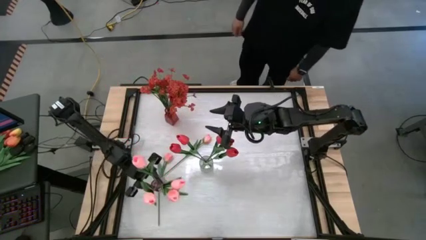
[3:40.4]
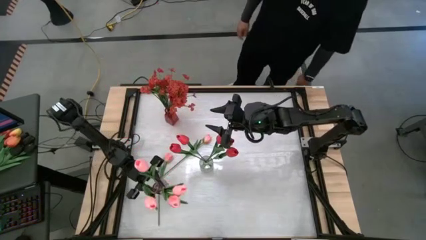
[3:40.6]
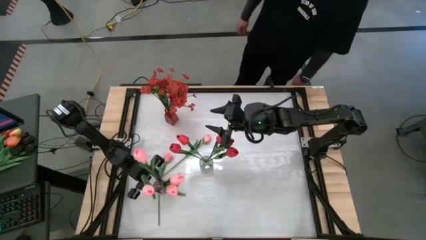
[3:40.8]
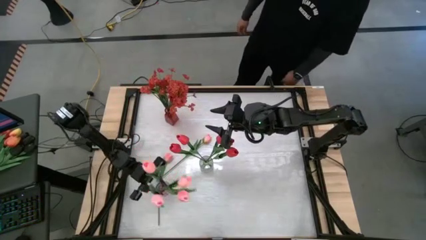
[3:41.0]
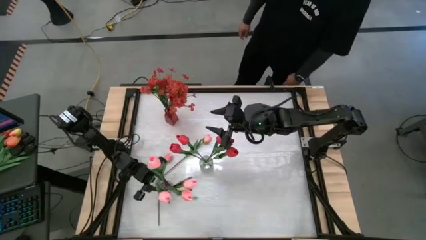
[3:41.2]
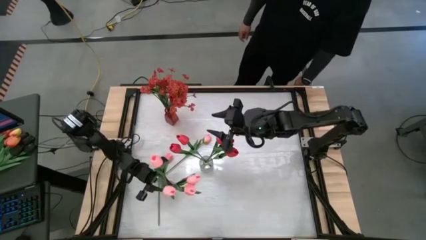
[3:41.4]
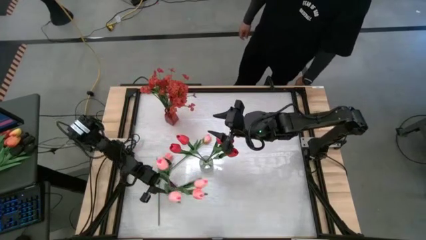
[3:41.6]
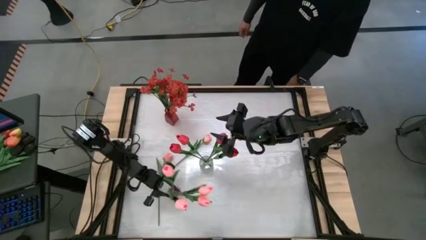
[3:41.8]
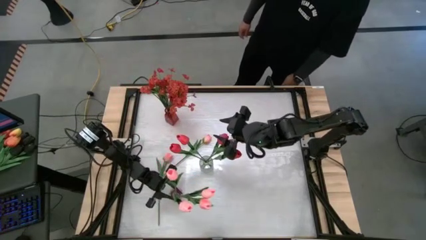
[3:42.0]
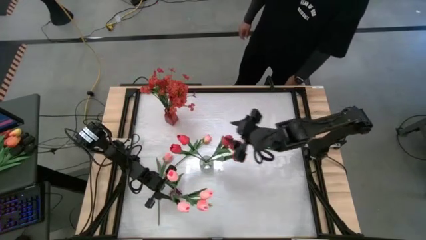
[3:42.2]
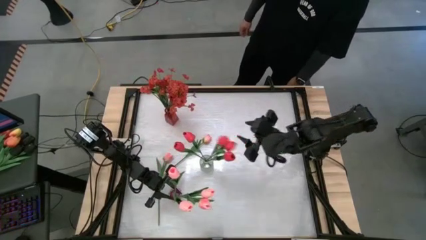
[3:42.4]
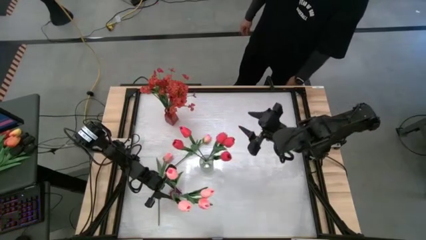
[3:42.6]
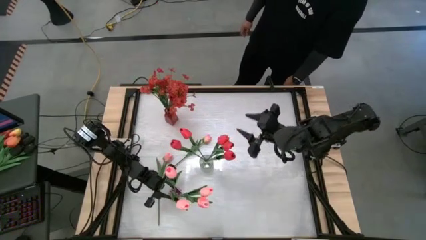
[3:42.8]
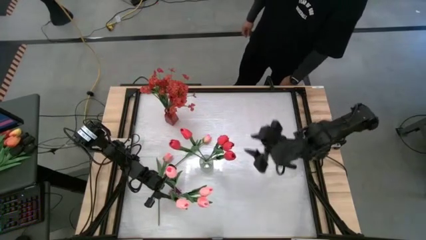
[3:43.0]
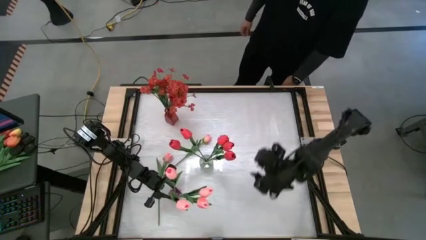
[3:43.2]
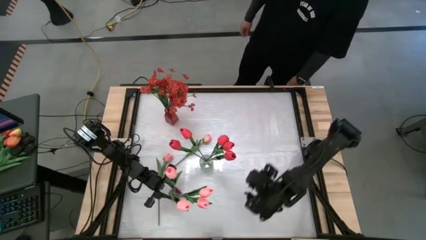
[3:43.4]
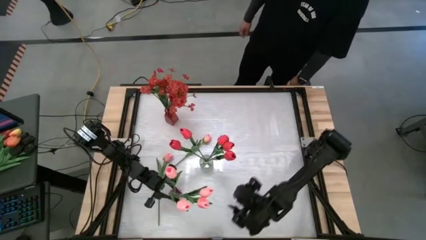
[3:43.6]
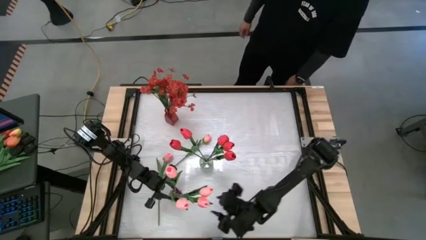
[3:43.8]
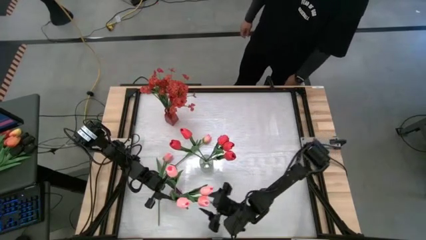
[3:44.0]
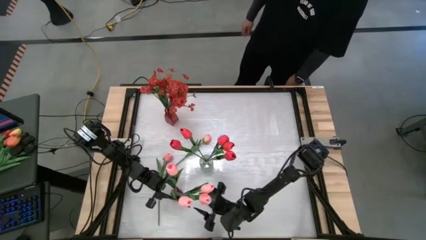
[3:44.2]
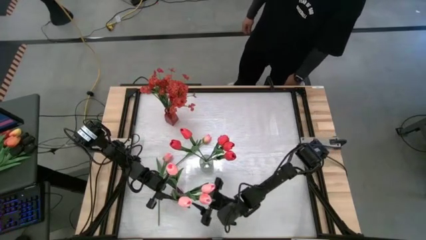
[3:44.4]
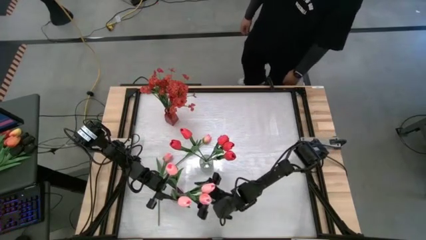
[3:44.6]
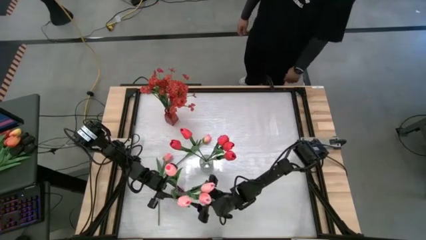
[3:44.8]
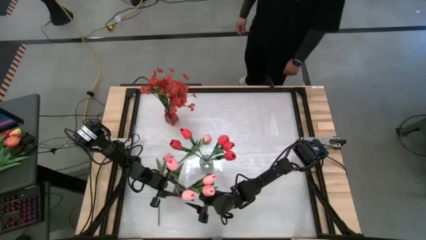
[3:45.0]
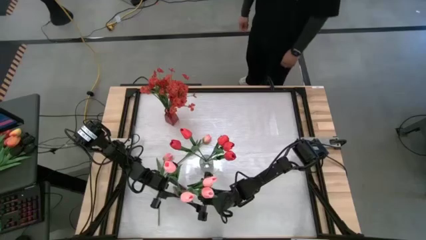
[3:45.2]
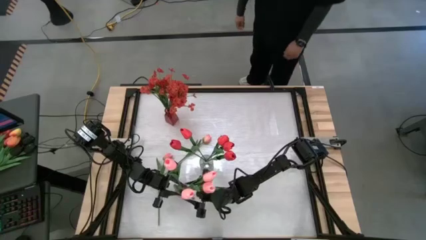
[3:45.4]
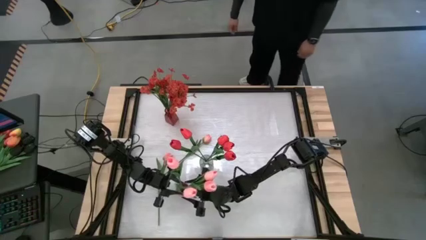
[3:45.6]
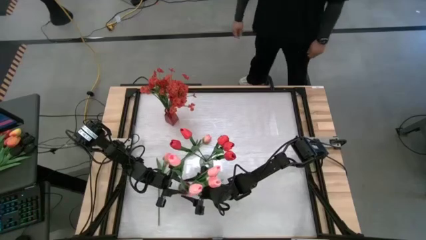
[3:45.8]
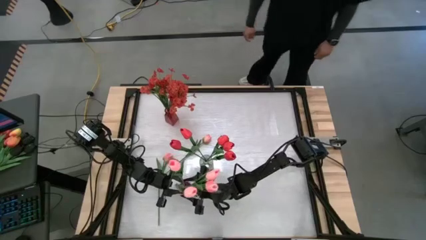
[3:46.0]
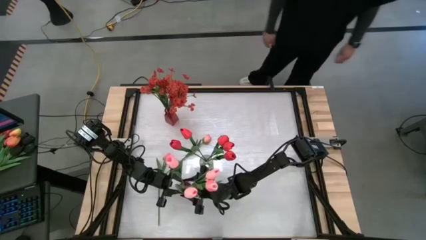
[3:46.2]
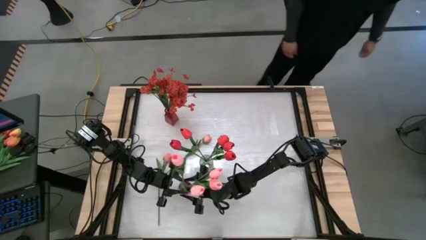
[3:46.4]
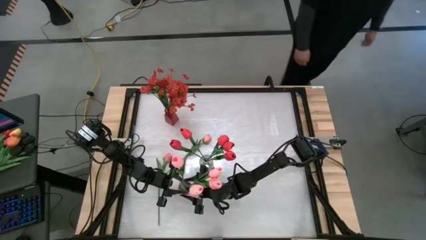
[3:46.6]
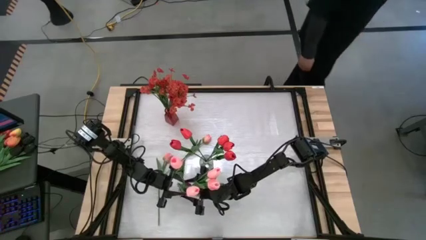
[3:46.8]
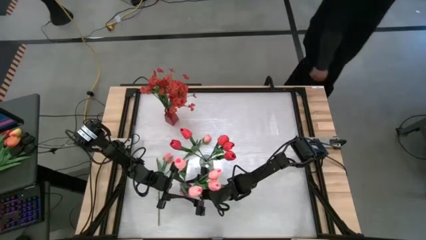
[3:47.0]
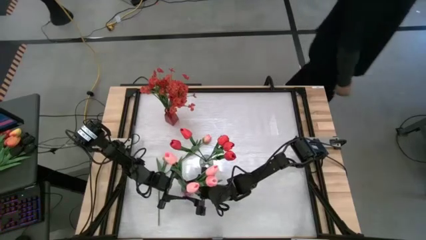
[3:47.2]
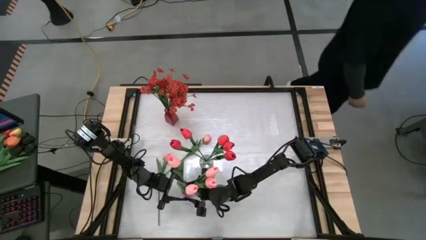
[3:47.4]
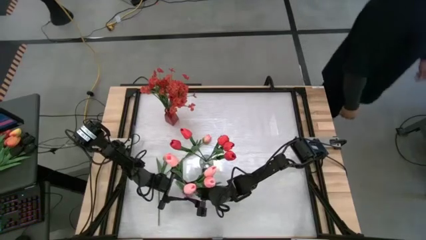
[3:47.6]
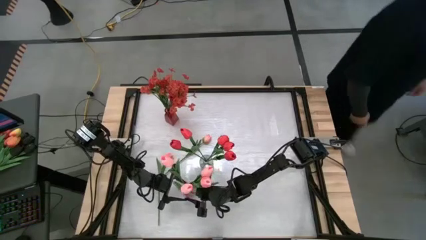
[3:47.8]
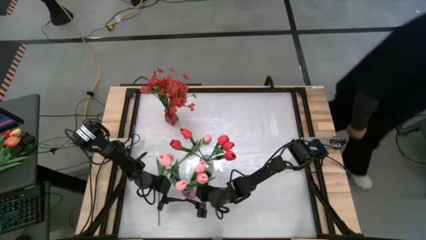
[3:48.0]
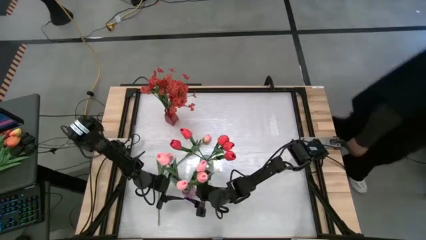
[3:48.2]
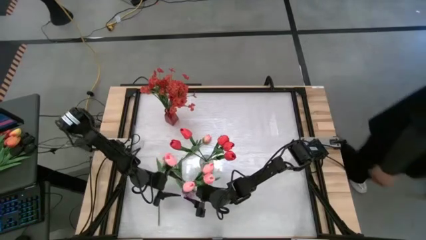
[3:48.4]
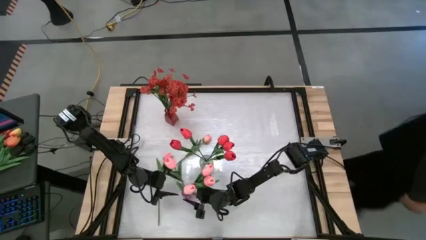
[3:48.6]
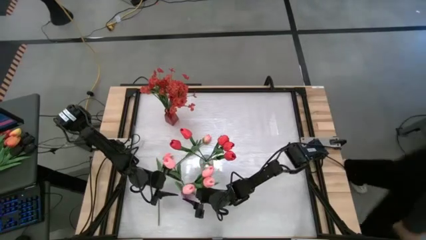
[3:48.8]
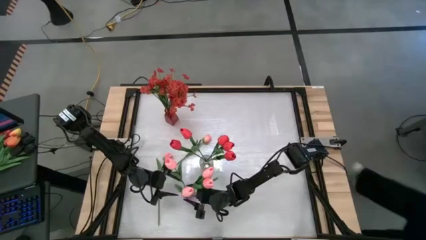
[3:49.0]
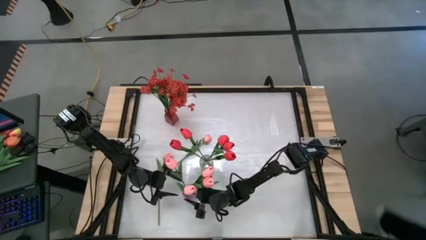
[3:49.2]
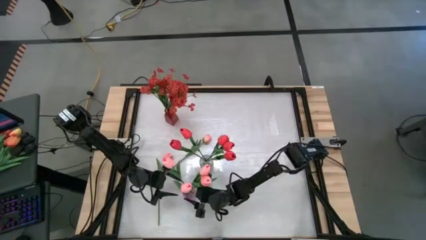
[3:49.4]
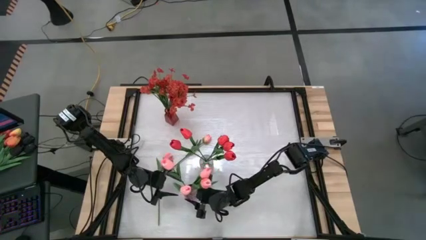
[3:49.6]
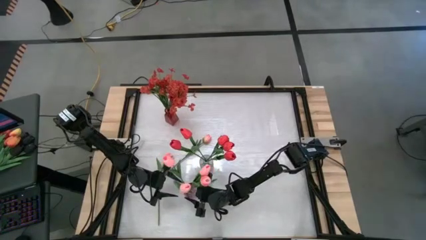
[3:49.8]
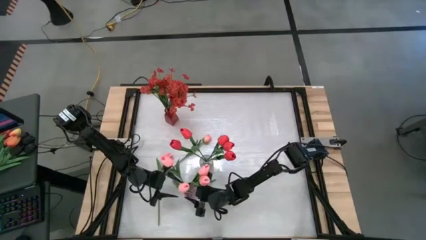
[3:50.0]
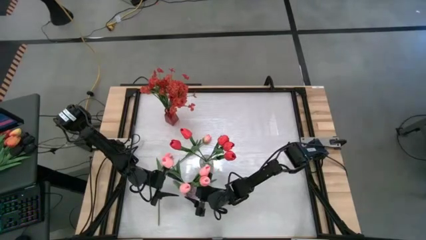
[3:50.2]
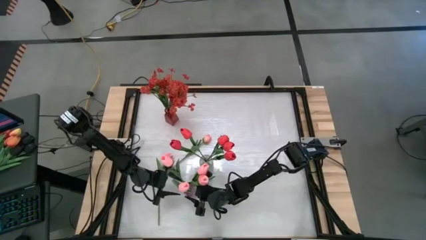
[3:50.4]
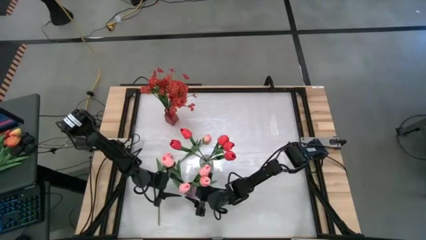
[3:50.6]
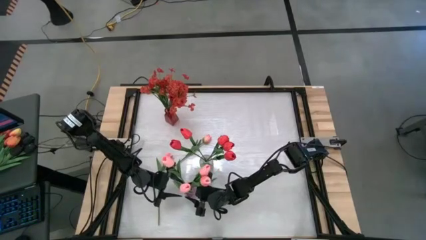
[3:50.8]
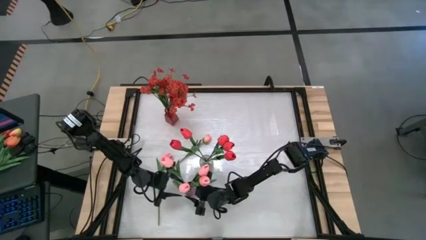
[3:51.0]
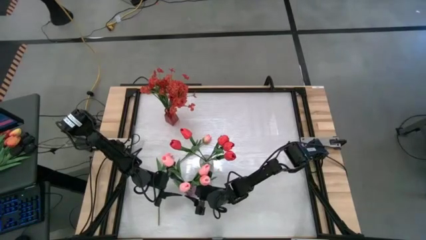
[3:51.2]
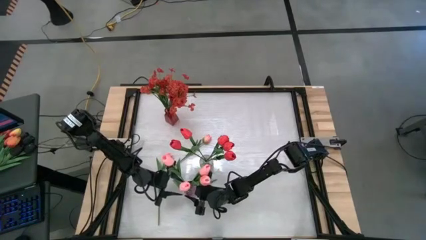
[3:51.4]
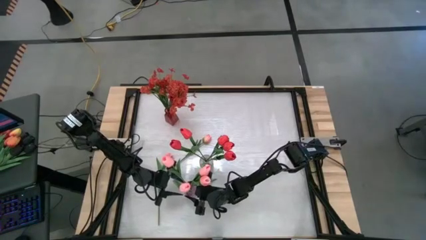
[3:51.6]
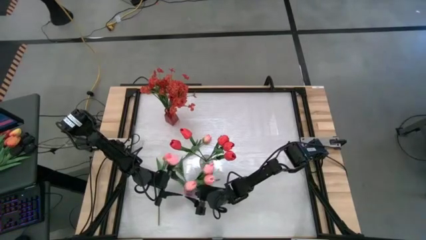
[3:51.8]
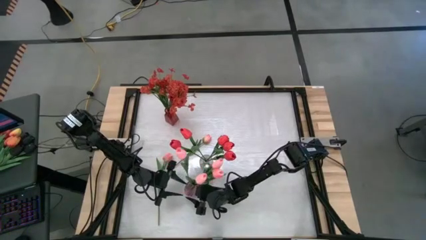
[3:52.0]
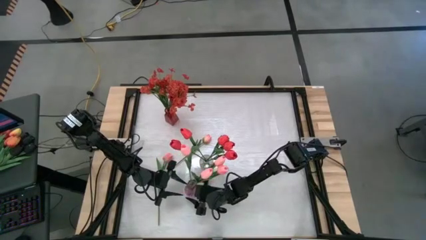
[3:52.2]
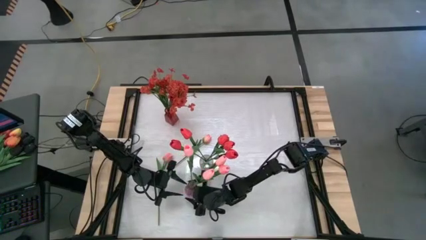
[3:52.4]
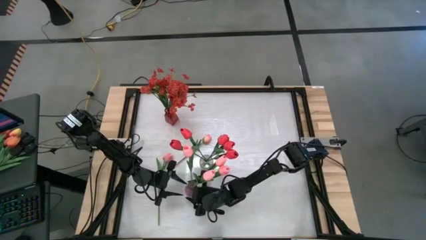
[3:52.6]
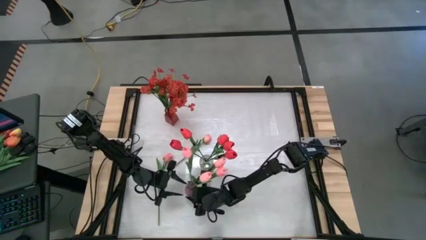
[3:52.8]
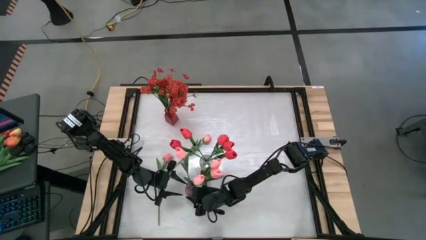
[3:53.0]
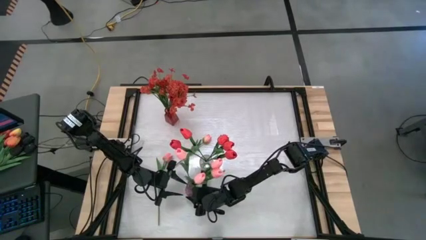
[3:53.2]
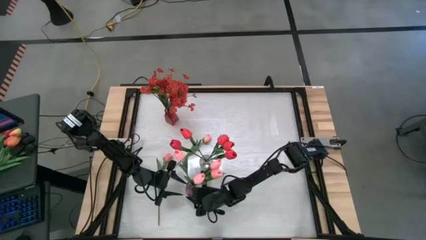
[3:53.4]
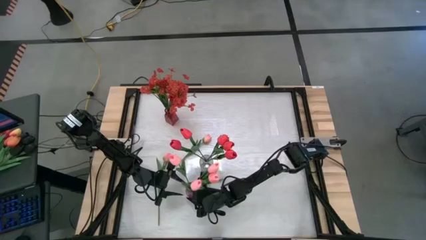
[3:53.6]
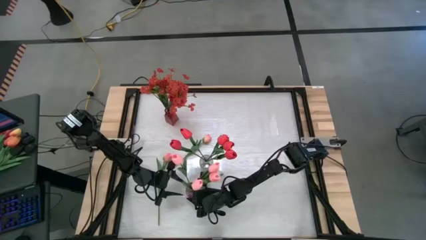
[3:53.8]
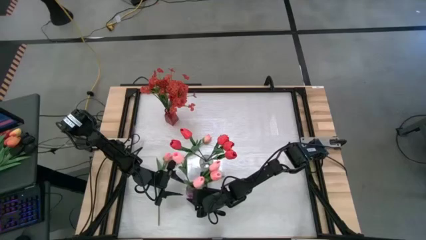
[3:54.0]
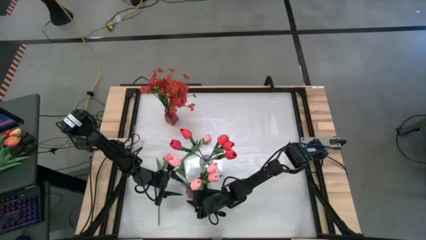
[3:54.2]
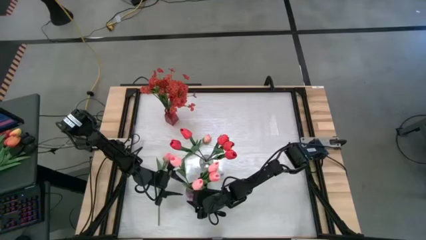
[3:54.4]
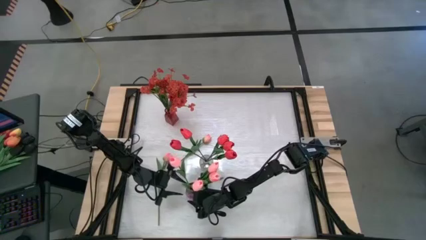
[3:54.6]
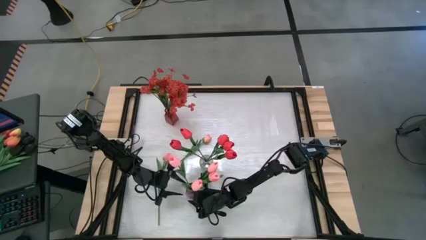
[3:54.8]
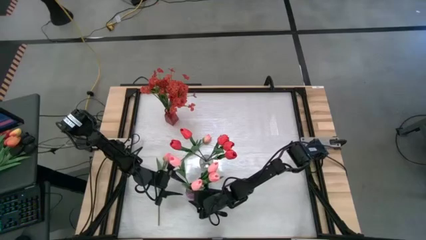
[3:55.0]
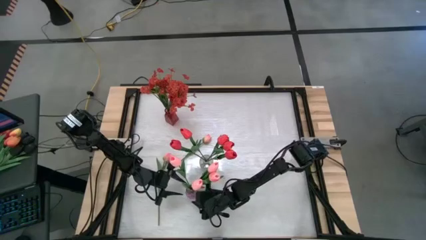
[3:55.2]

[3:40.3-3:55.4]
Task: Sort flowers into vase by color
Put the pink flower into the purple vase
